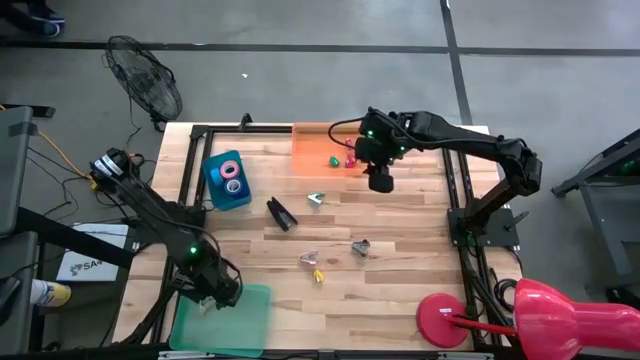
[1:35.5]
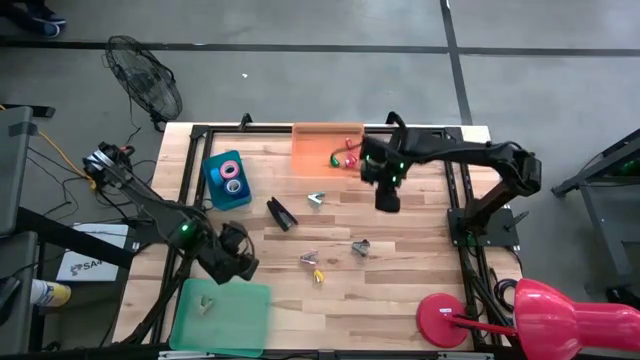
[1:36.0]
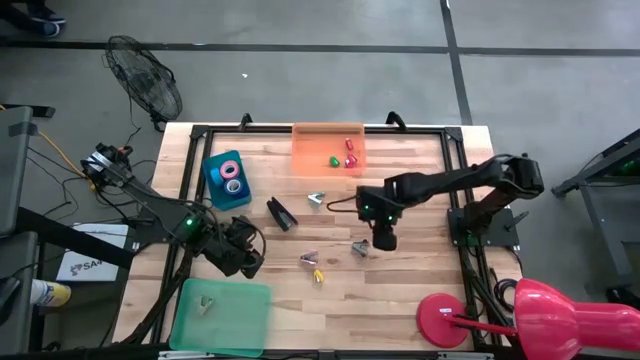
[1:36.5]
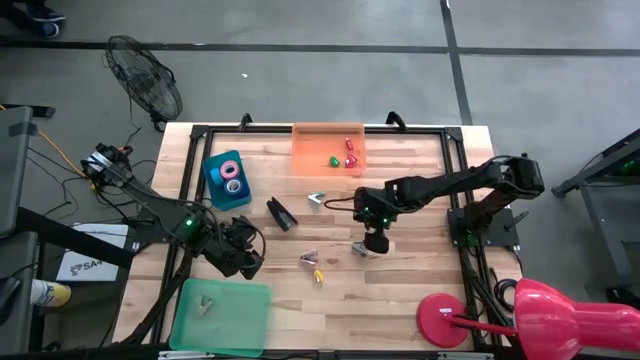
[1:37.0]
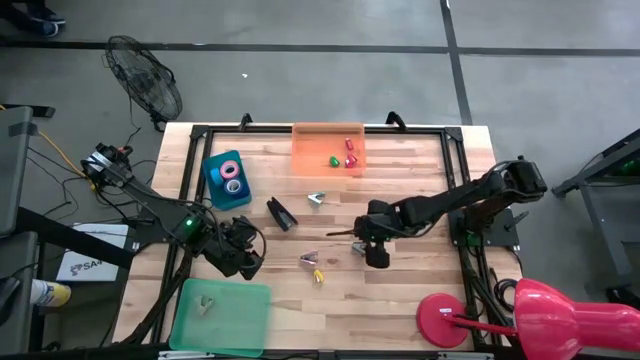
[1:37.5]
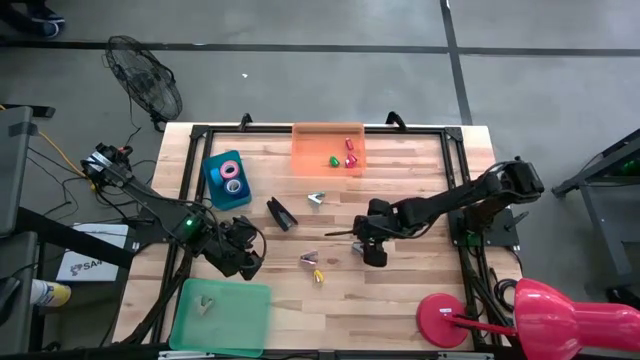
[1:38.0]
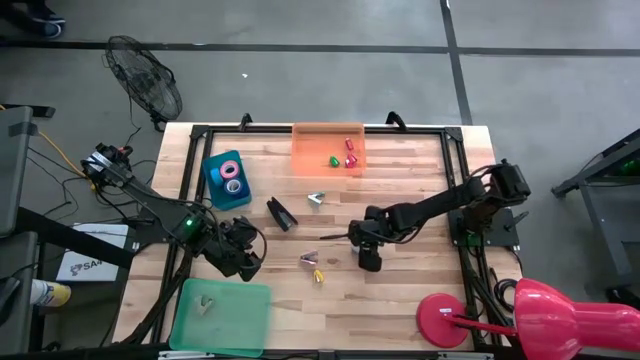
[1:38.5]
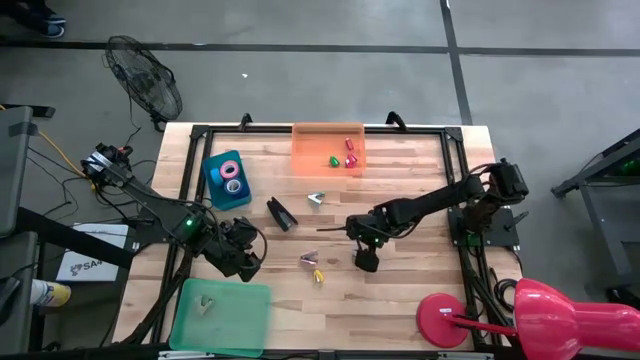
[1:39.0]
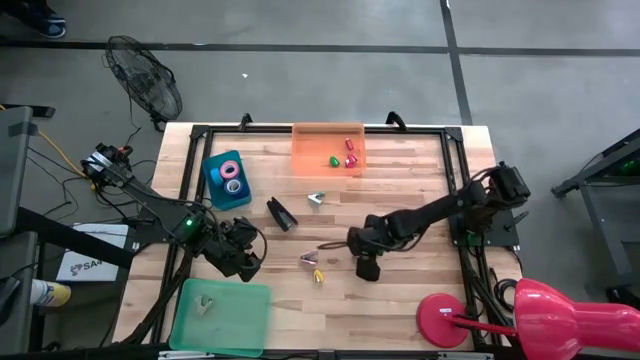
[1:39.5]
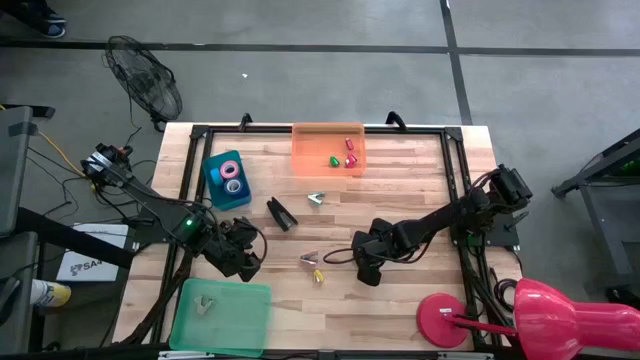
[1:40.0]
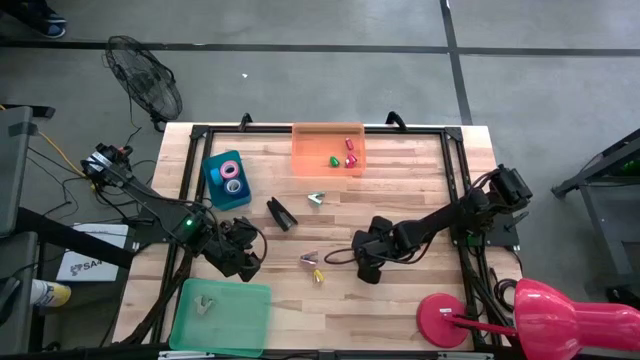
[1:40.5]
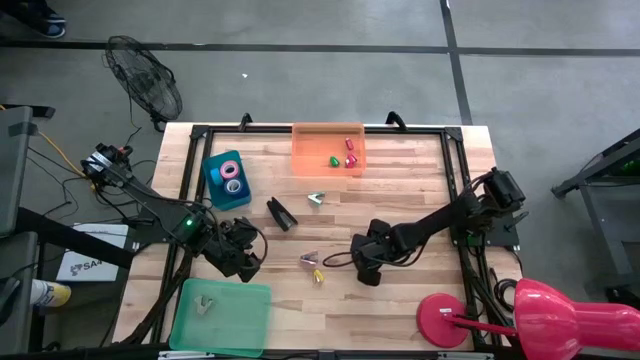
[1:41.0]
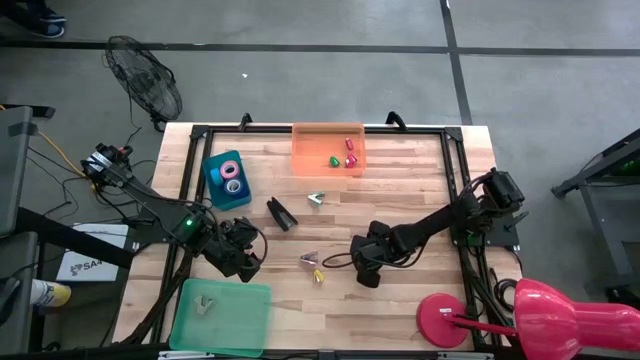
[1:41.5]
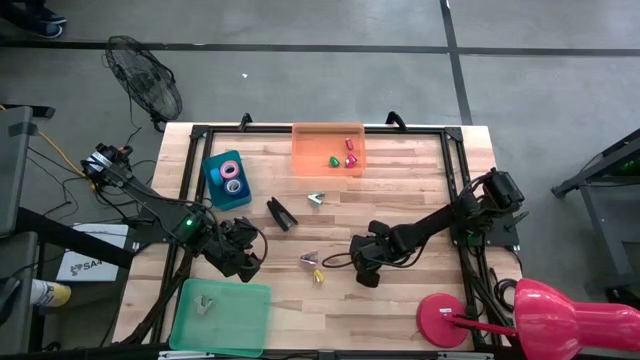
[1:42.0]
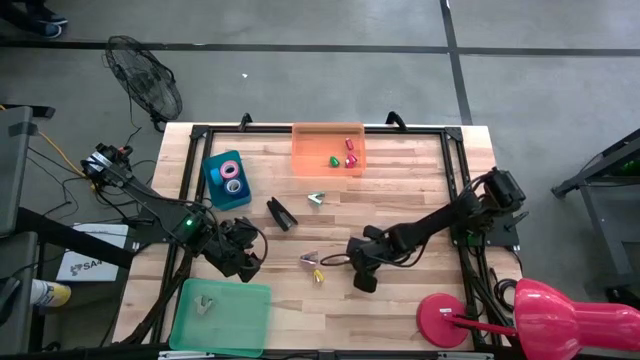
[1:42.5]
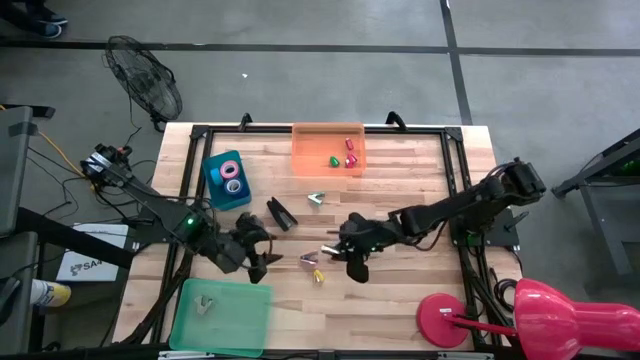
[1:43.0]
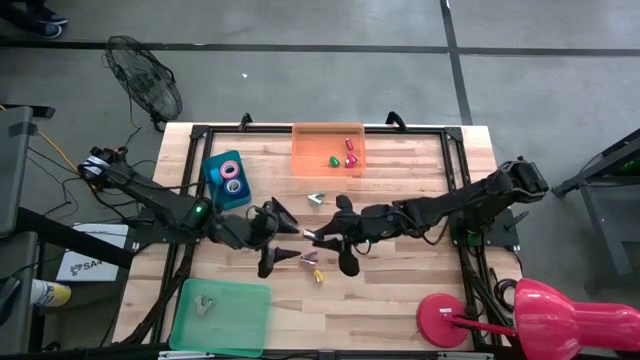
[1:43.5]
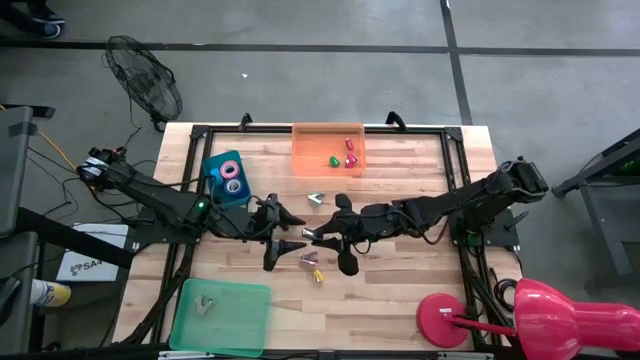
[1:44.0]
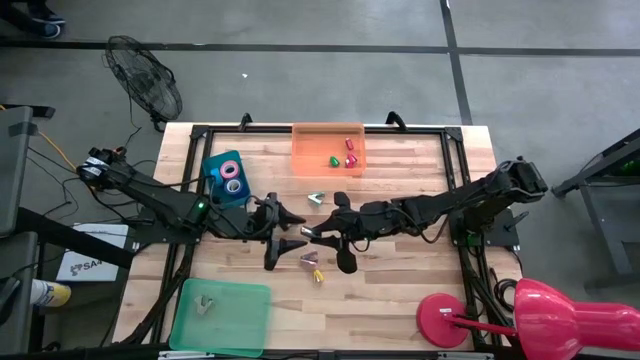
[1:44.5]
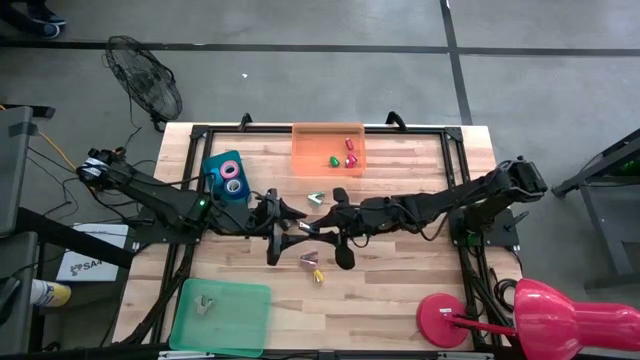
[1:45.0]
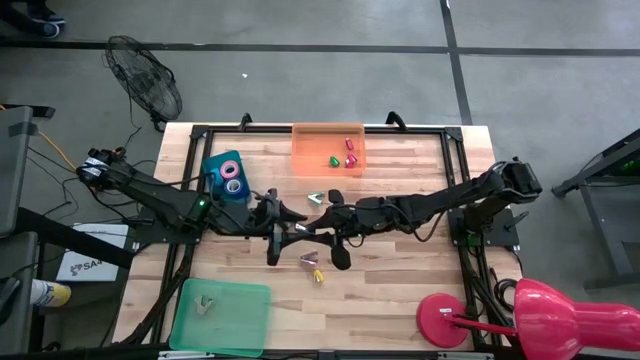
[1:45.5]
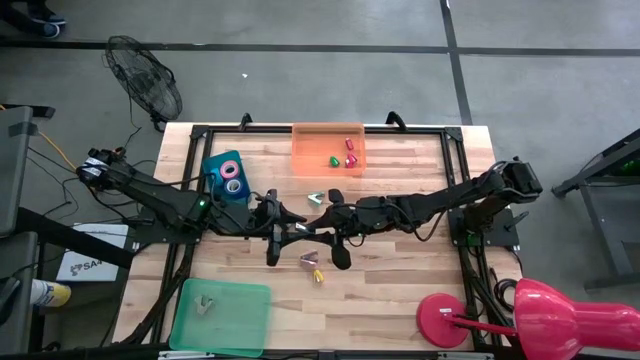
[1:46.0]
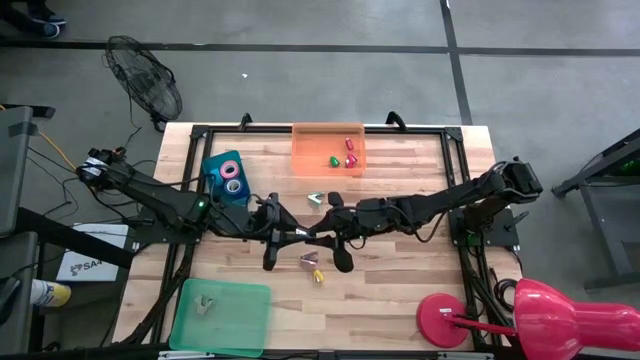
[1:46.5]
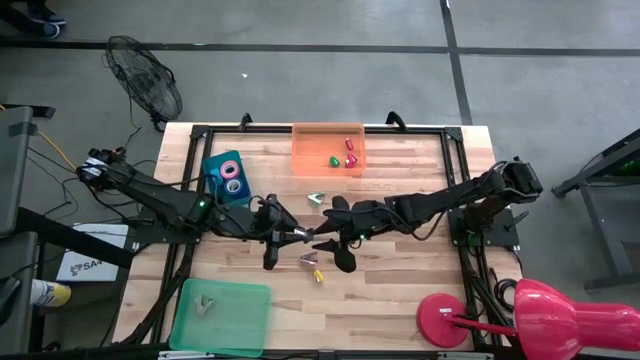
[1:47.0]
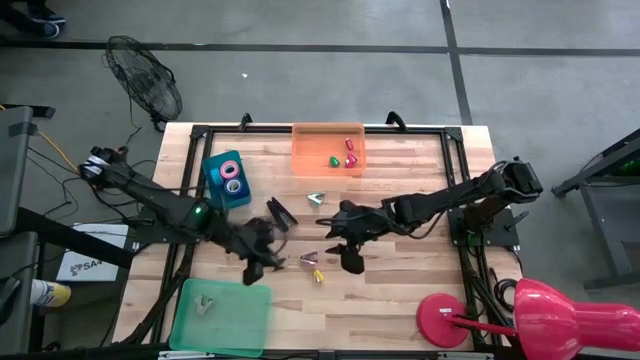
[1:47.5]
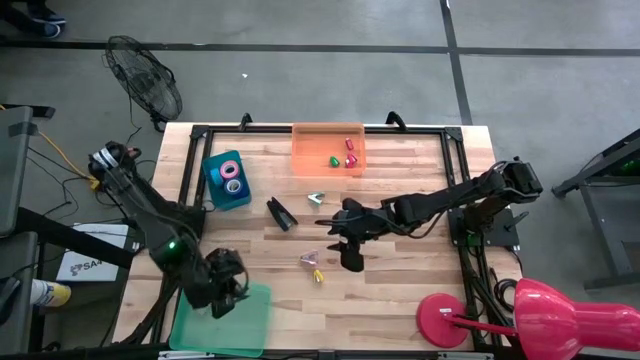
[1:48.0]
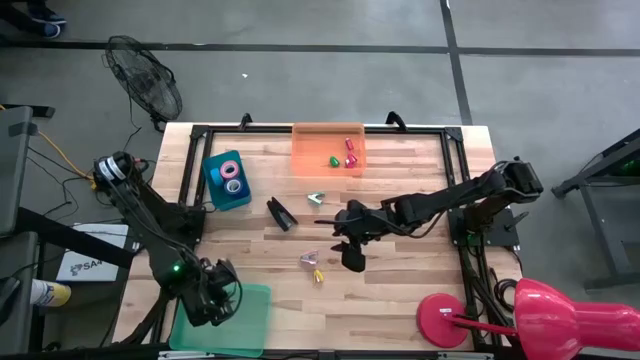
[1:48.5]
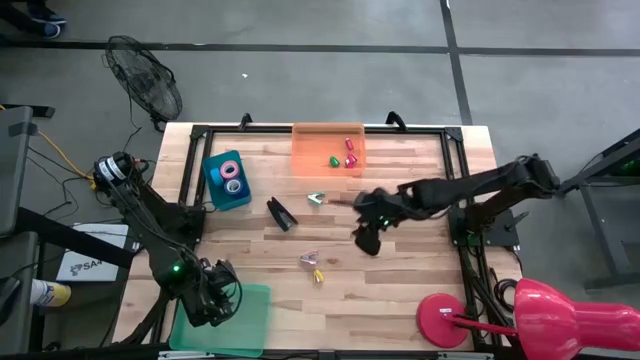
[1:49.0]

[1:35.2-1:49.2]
Task: Pick and place Stapler, Stapler remover, tape
Put the black staple remover into the green bin

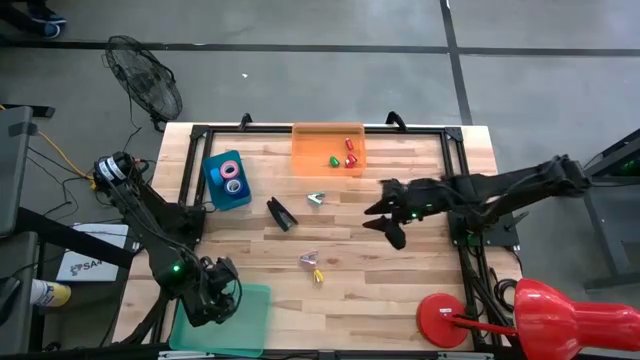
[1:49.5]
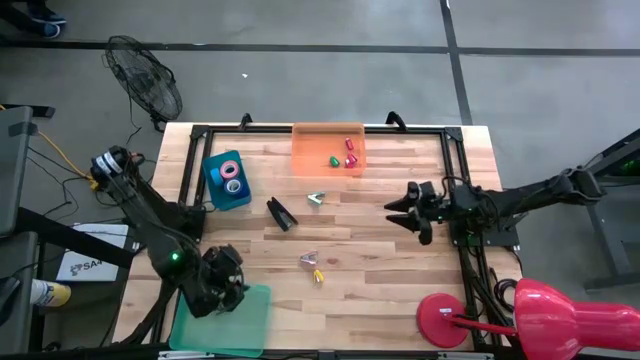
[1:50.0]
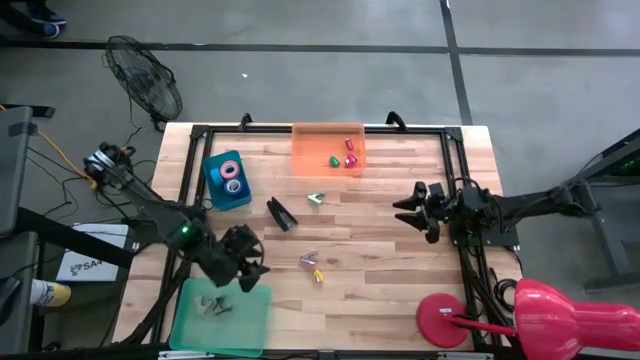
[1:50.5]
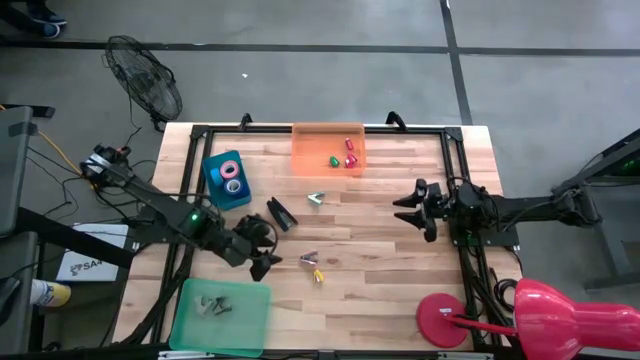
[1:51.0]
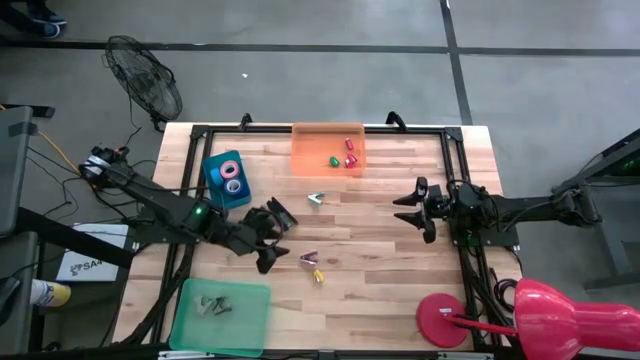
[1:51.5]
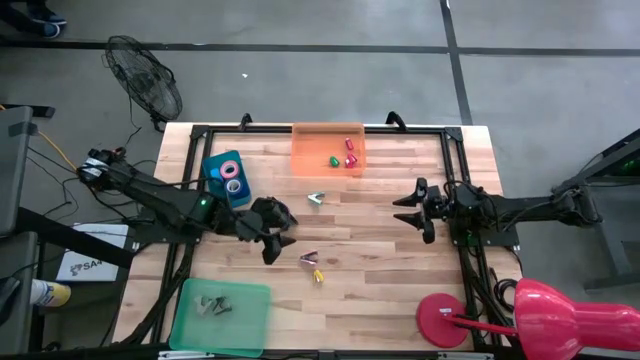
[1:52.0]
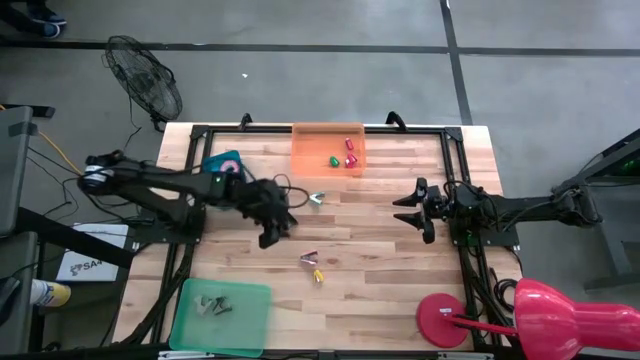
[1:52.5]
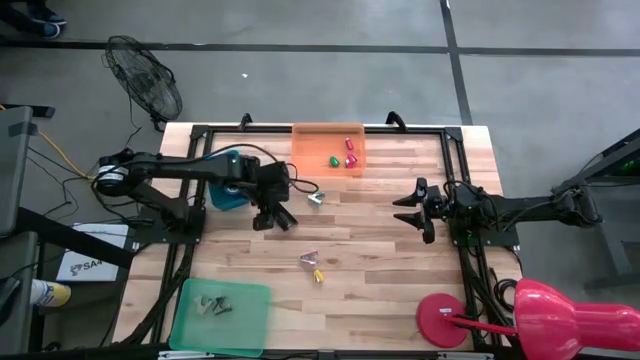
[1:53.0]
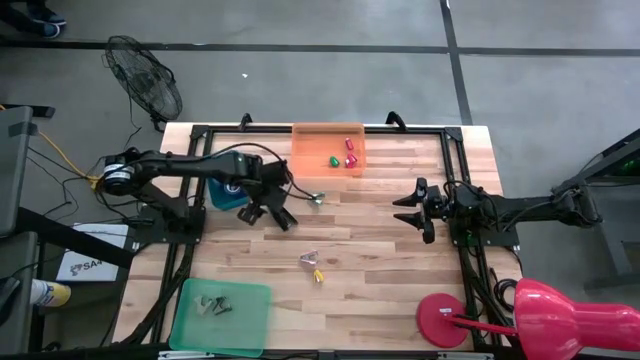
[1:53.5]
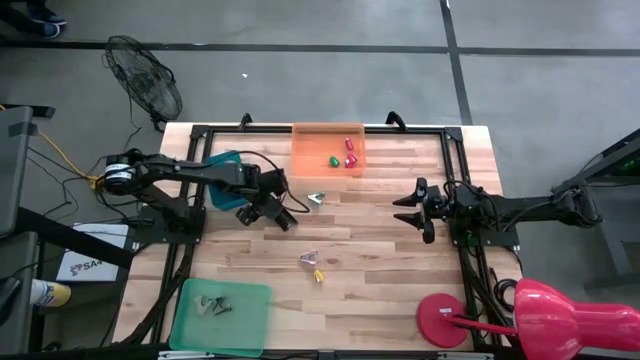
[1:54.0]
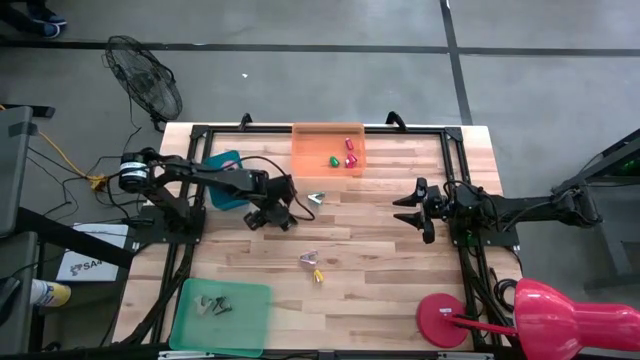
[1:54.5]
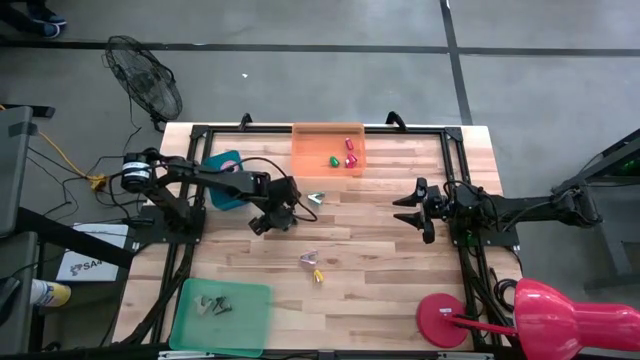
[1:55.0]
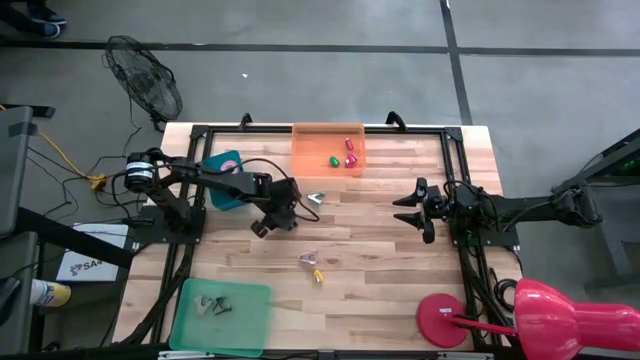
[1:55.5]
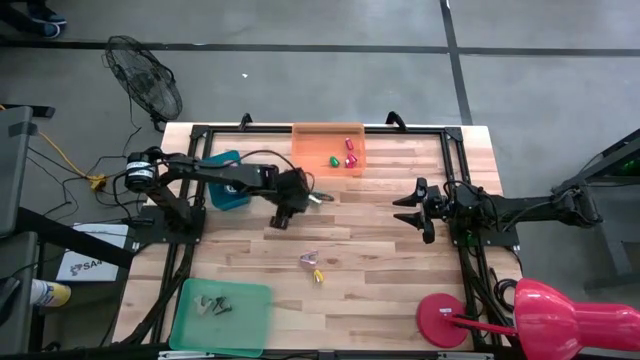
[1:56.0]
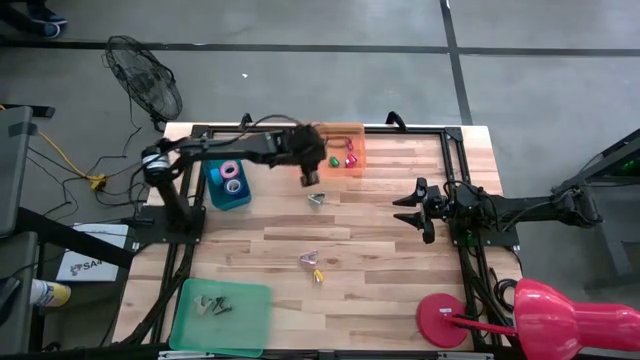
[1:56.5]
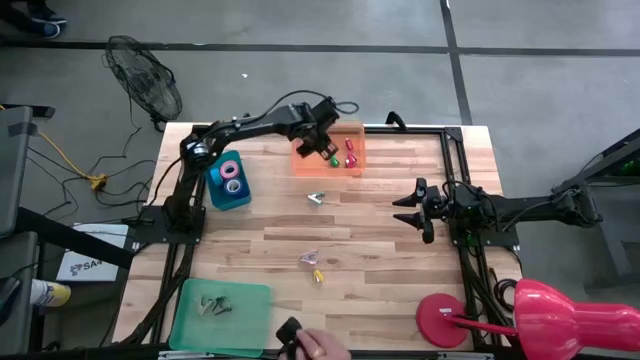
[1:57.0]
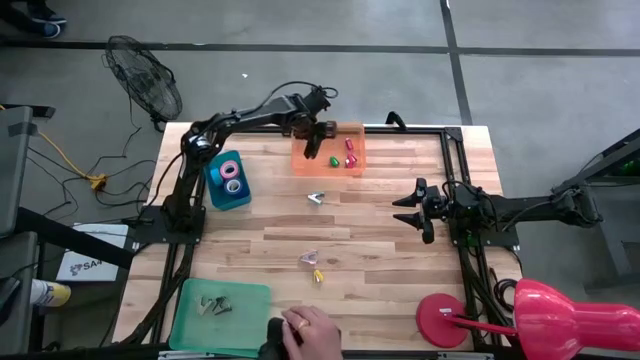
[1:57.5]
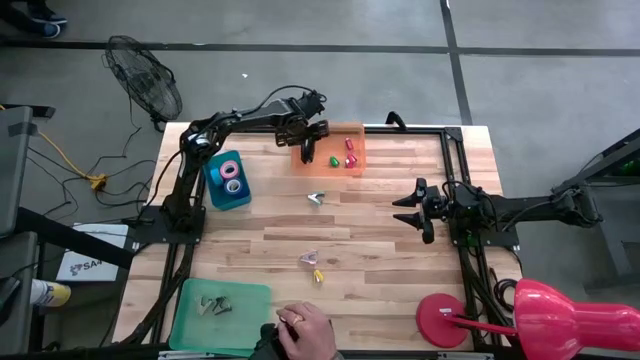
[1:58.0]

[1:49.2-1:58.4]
Put the black stapler into the orange bin
